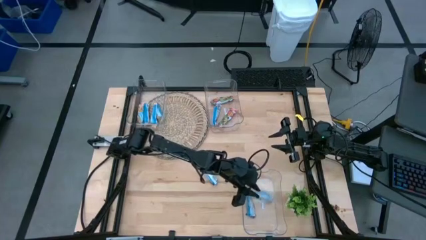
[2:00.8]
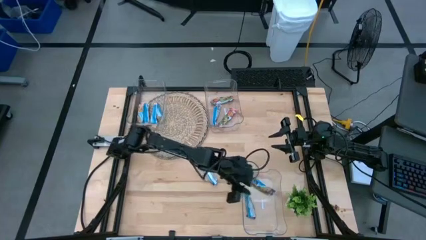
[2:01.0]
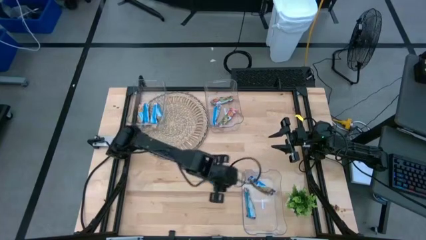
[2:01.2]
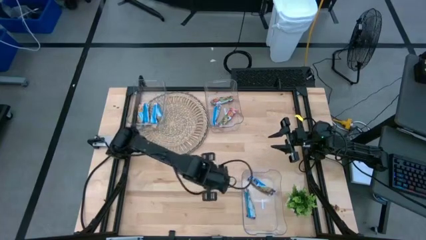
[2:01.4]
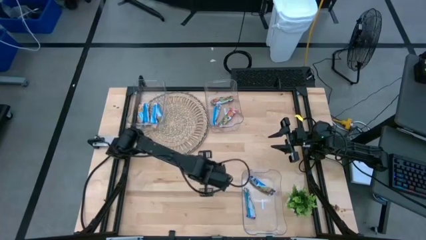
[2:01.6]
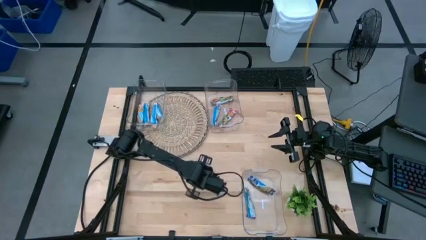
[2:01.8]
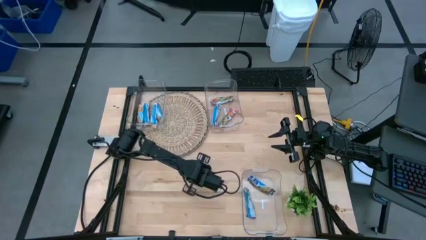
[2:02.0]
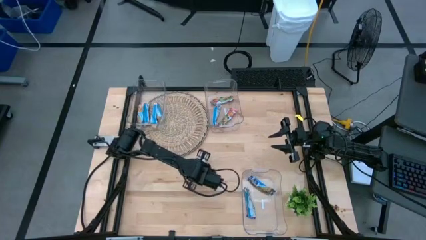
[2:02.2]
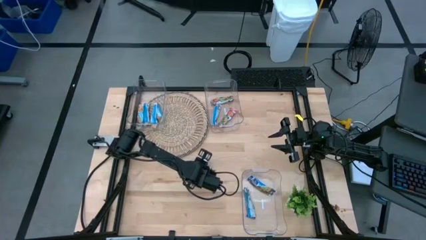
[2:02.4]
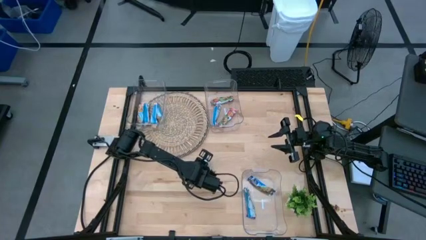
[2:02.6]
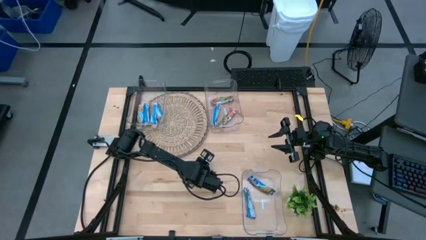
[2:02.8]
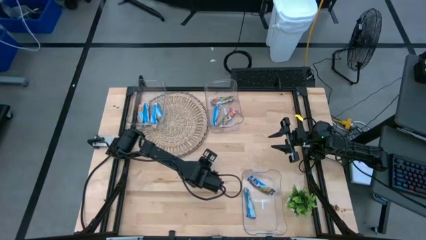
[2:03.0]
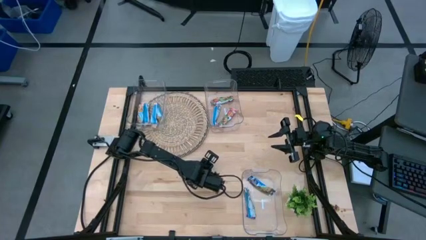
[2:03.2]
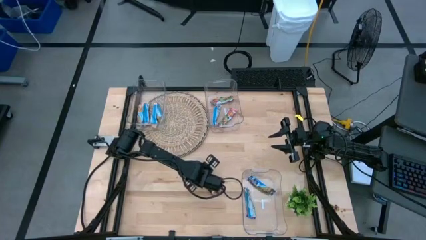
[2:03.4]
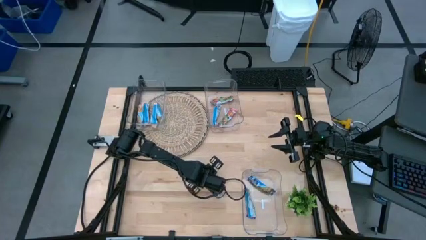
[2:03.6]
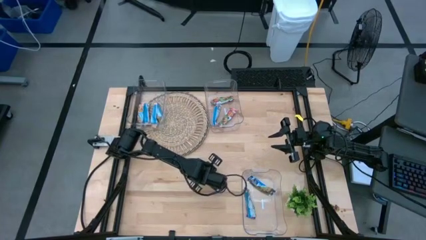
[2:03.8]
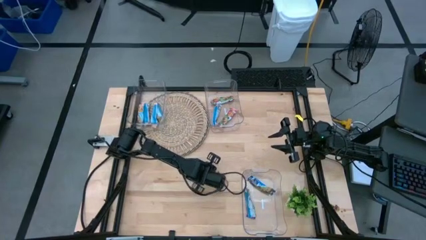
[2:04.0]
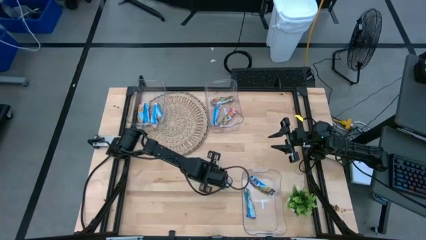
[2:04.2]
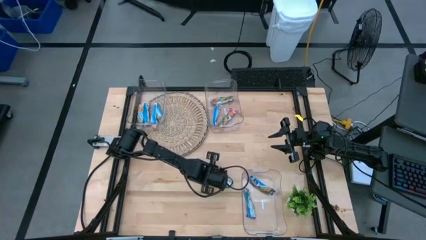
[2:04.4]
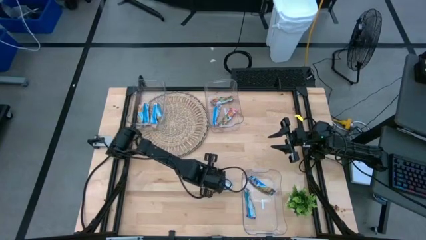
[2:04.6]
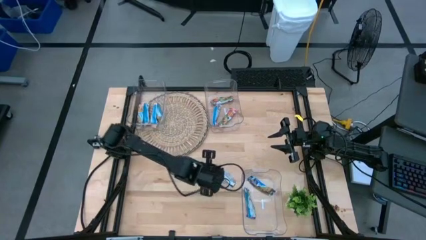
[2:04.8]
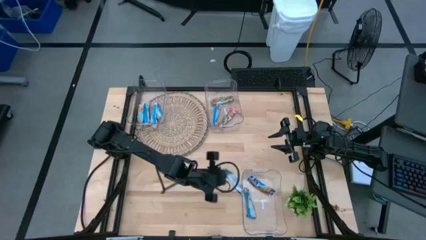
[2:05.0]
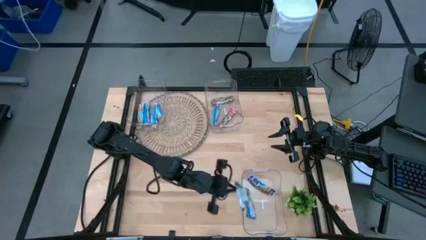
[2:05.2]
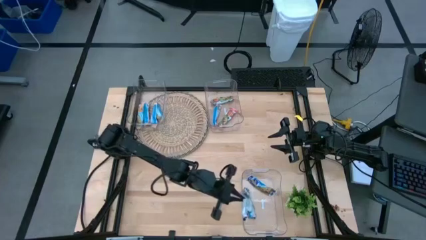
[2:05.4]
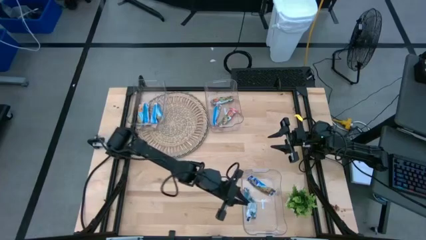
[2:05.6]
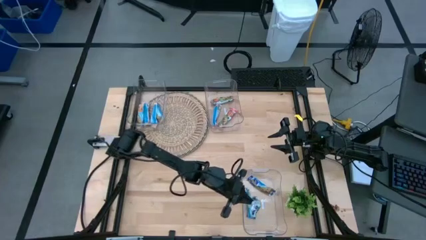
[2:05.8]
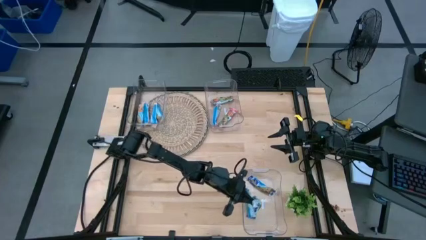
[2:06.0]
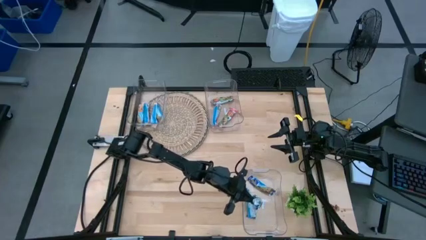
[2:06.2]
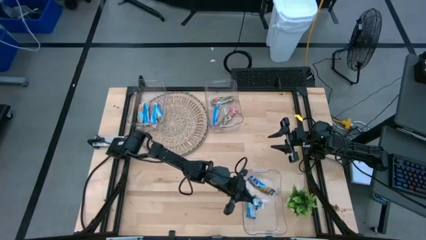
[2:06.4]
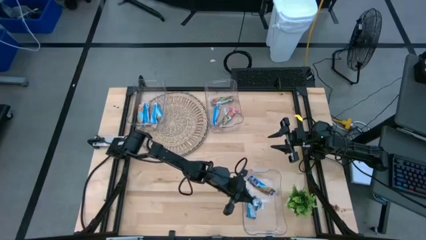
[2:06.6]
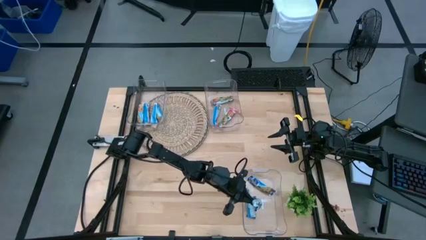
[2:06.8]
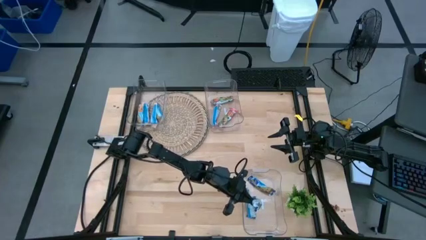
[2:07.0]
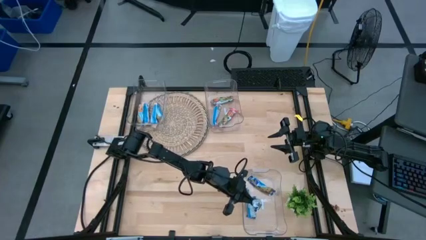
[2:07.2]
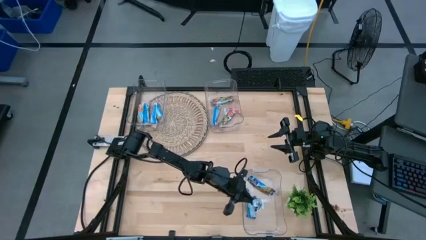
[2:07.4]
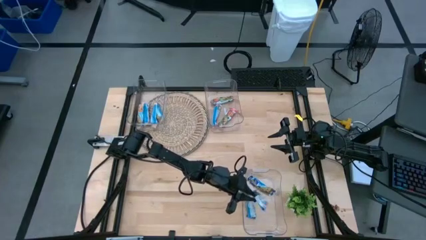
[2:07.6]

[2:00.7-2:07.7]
Task: Pick and place Granola Bars by type
Put the blue granola bar into the bottom transparent bin

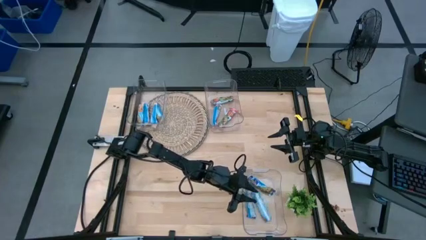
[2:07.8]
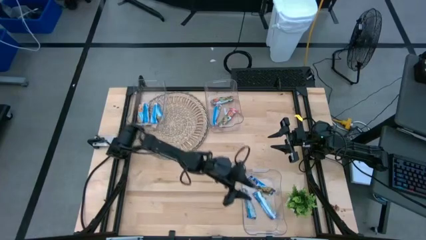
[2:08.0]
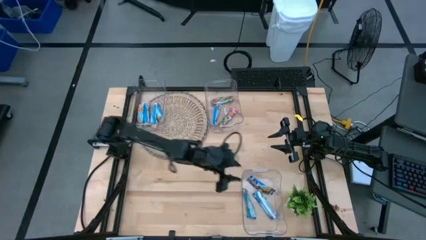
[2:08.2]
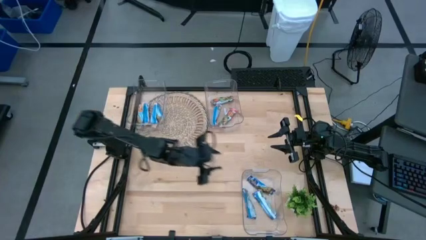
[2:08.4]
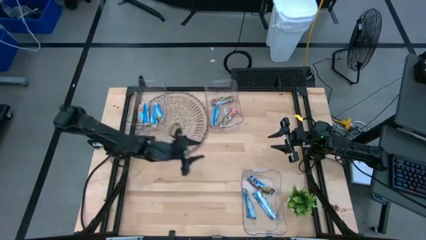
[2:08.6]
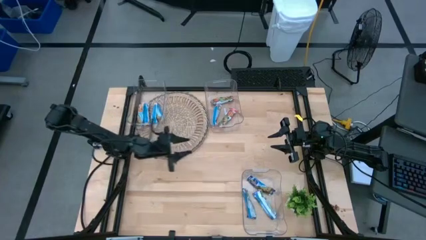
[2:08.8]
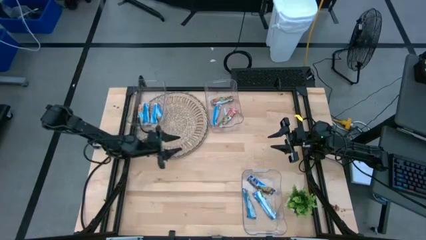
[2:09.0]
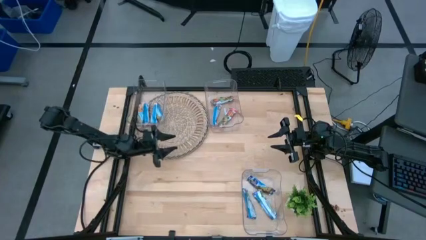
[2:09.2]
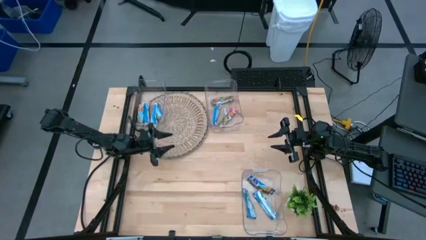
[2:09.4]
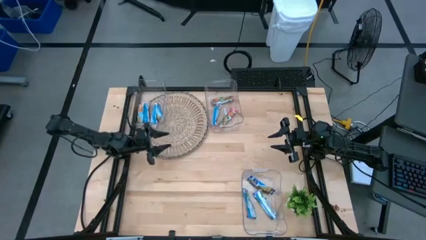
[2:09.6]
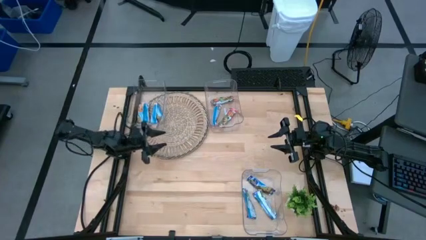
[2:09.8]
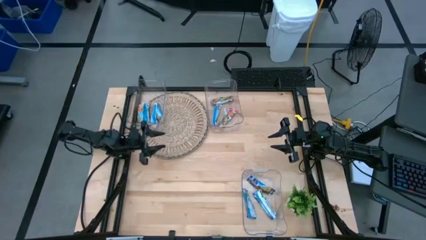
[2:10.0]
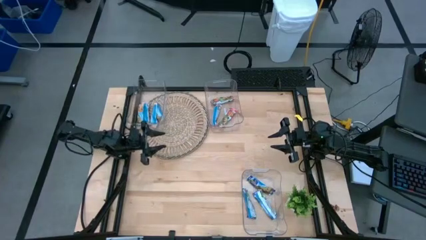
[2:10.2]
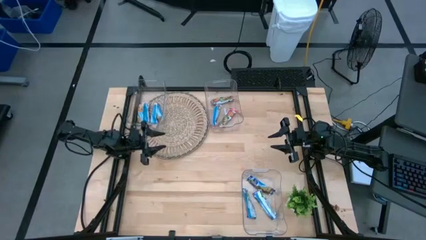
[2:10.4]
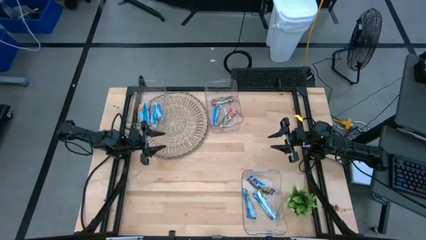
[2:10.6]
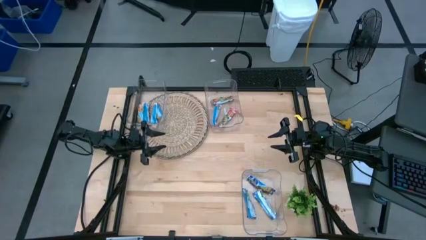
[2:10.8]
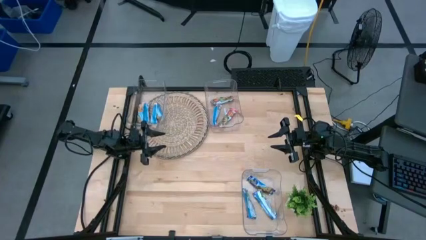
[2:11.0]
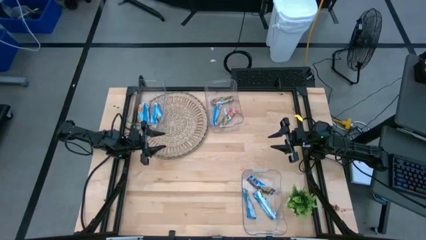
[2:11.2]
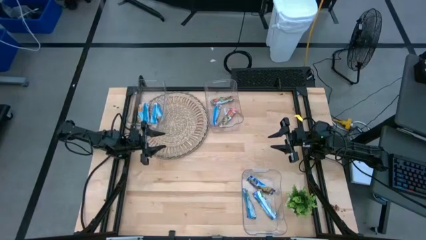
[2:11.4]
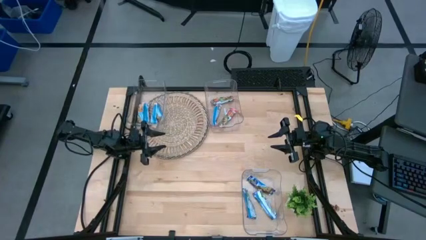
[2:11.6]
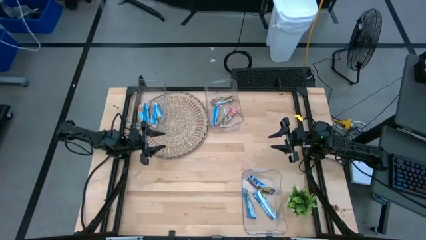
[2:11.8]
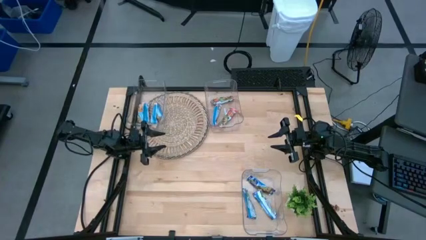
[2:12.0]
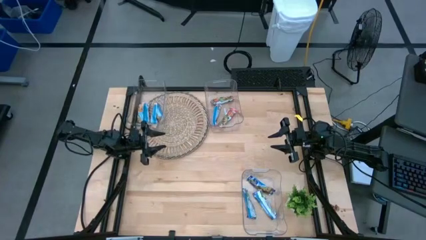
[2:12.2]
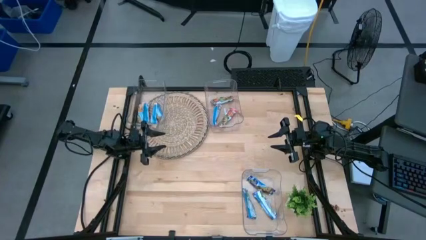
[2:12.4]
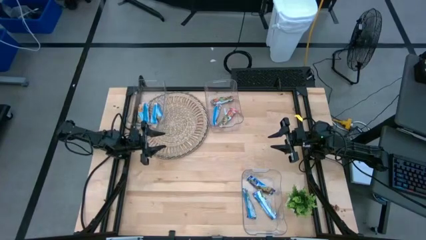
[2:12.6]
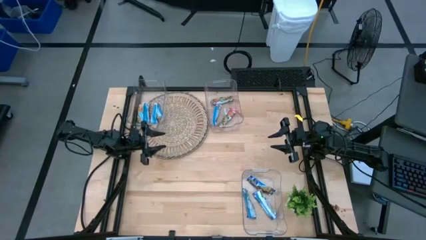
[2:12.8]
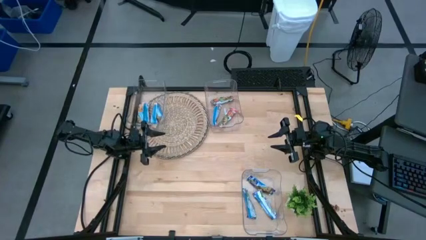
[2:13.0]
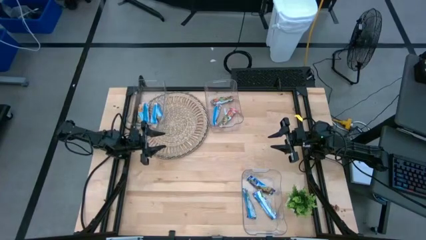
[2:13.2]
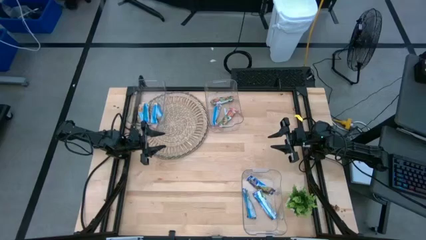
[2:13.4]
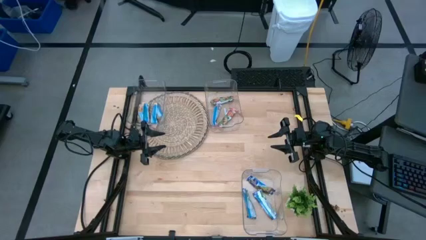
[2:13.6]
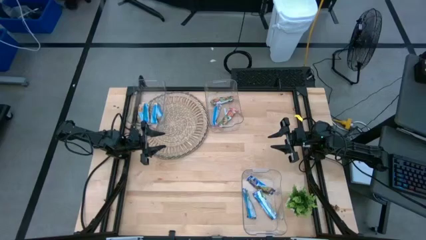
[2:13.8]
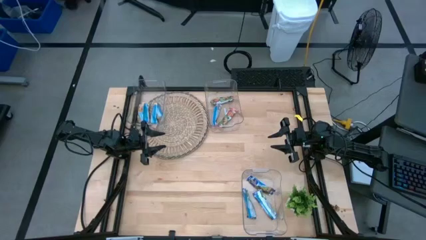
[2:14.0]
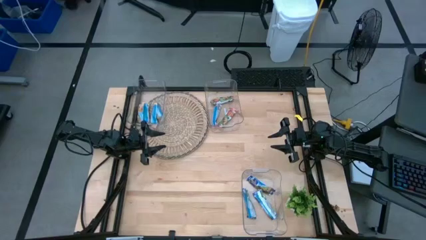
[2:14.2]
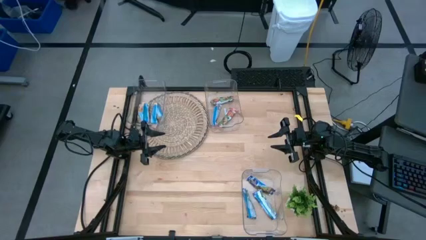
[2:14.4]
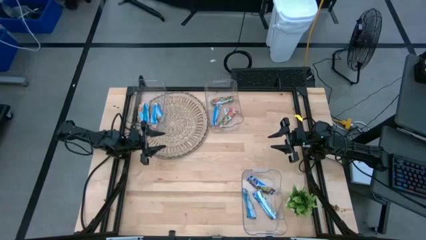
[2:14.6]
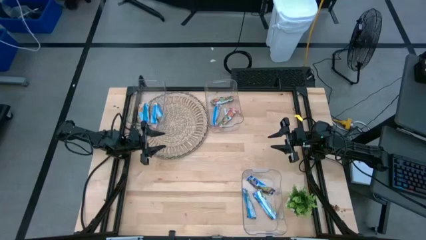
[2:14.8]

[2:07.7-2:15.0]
Return to Home Position

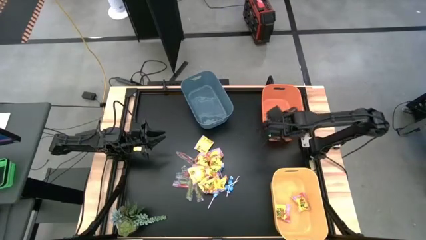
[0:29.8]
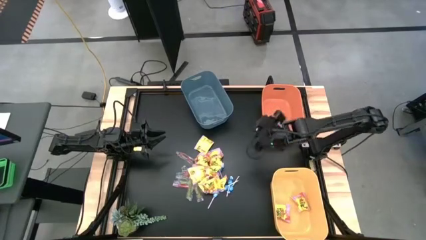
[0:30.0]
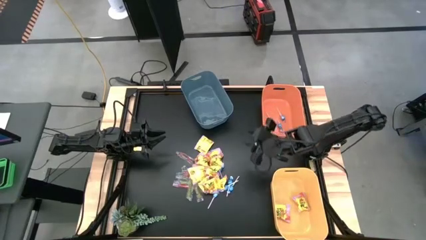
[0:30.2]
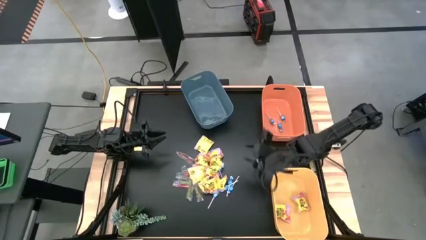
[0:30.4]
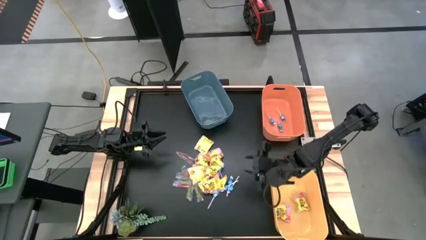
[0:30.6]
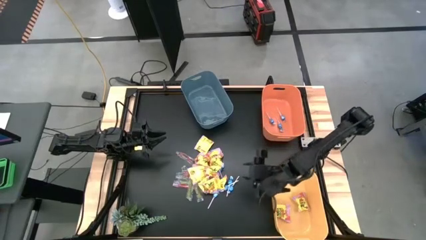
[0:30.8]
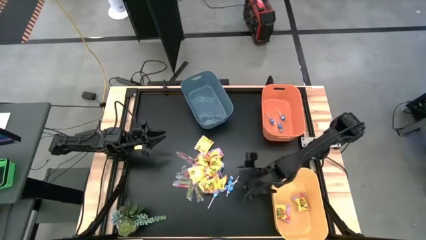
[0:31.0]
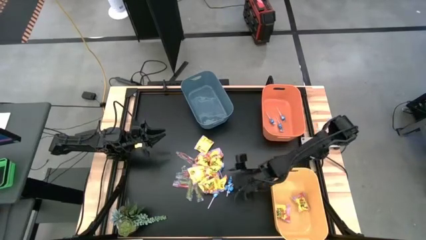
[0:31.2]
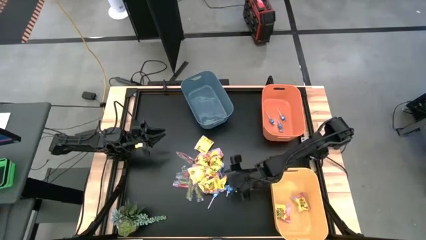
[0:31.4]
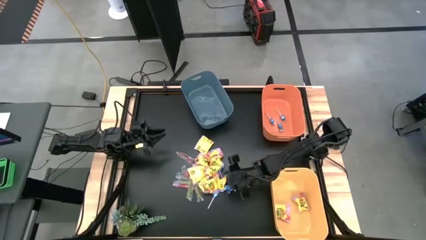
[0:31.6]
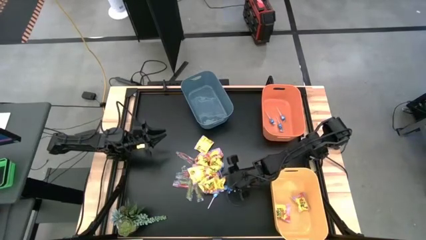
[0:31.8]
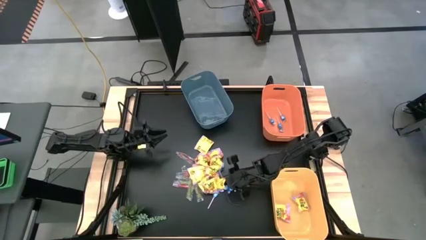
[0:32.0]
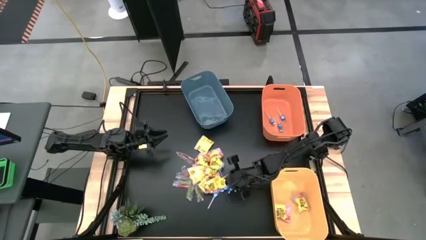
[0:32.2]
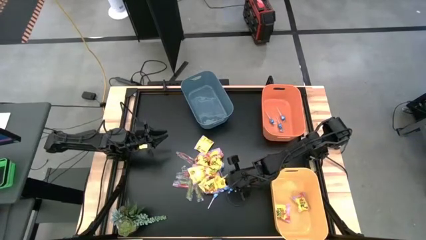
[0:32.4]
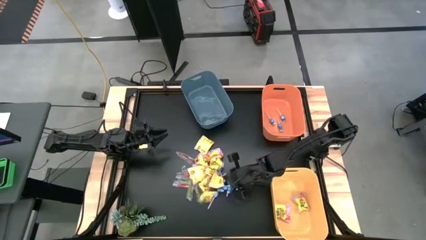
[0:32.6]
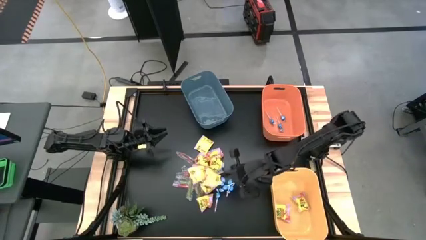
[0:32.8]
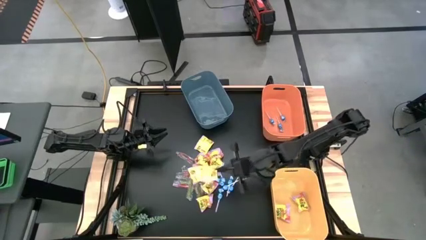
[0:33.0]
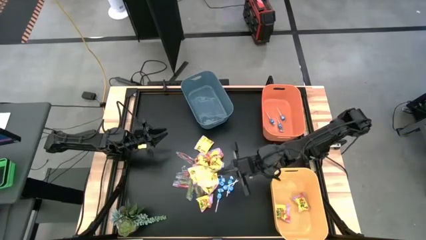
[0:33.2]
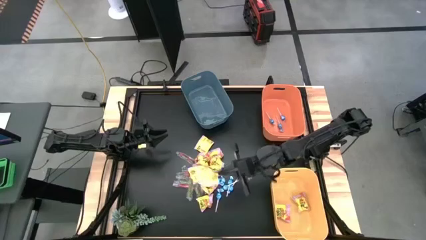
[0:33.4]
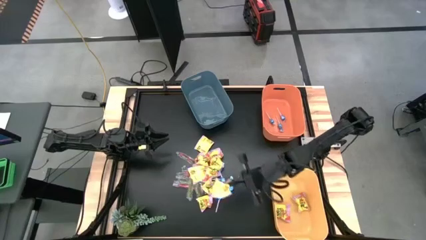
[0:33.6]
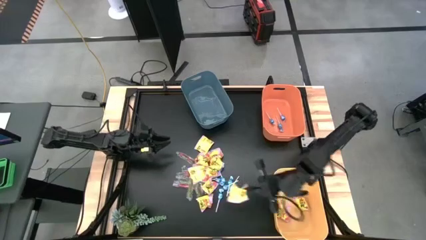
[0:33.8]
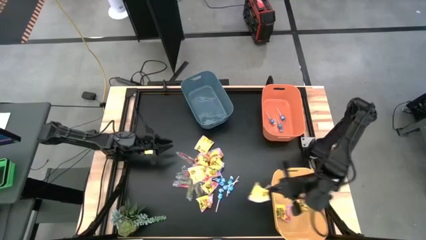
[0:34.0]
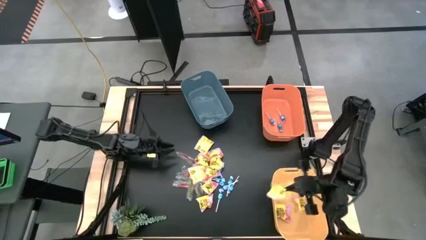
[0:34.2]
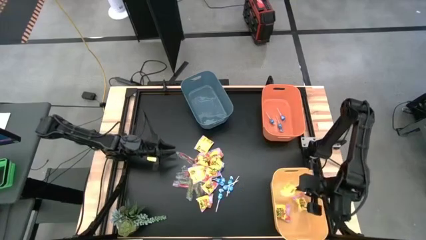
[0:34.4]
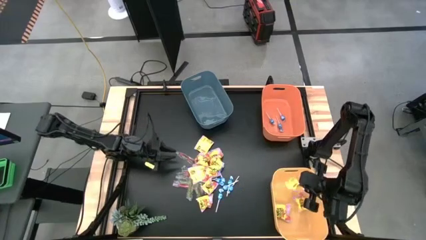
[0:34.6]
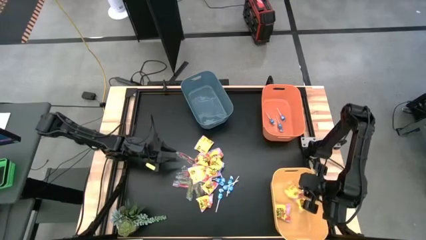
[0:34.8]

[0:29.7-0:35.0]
Task: Sort candy
Put the yellow candy into the yellow bin
